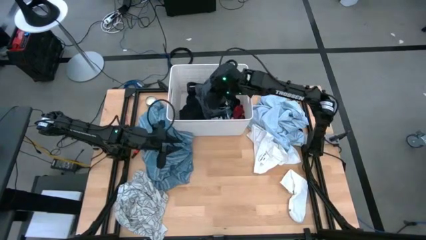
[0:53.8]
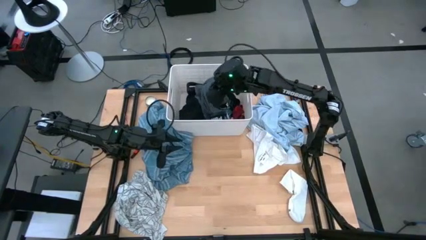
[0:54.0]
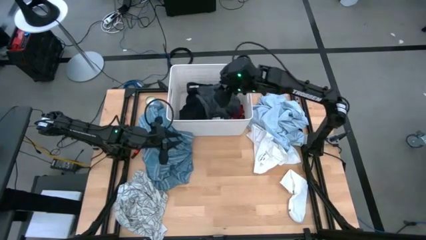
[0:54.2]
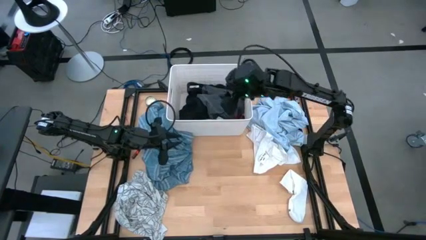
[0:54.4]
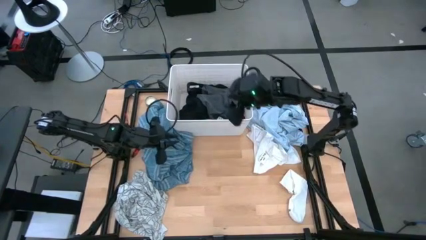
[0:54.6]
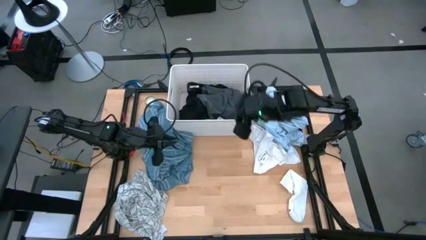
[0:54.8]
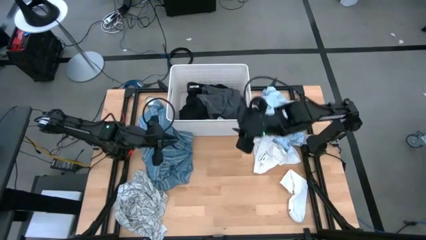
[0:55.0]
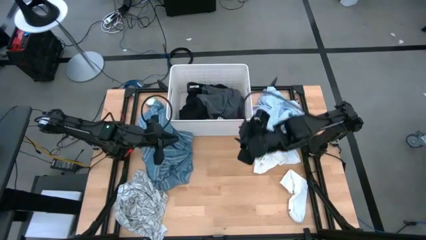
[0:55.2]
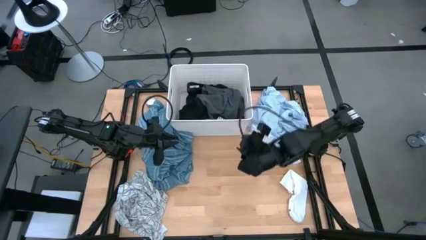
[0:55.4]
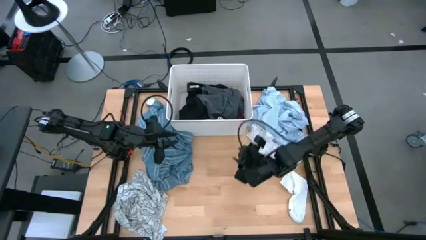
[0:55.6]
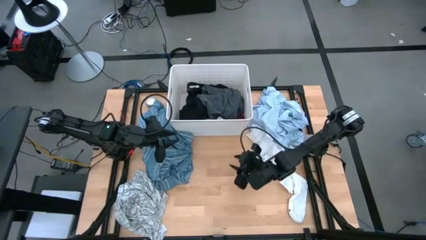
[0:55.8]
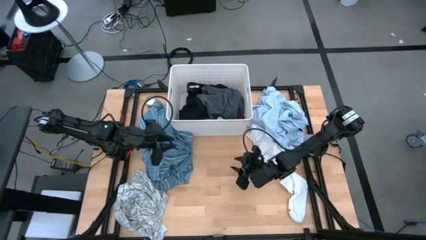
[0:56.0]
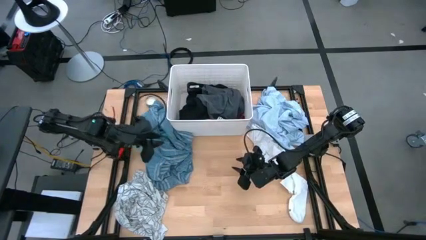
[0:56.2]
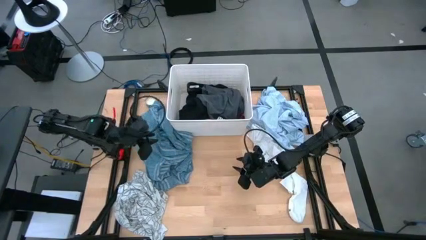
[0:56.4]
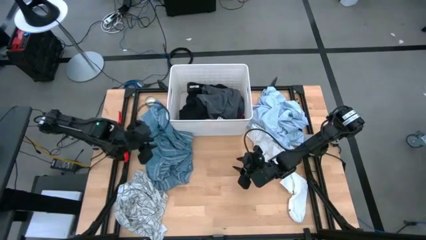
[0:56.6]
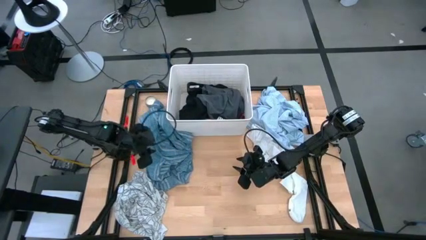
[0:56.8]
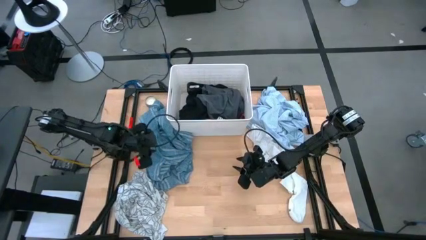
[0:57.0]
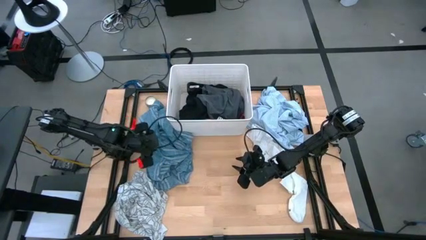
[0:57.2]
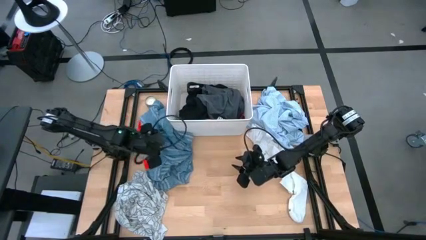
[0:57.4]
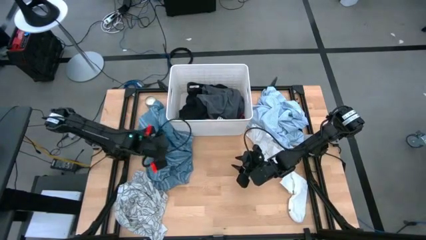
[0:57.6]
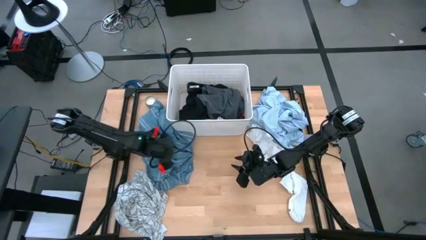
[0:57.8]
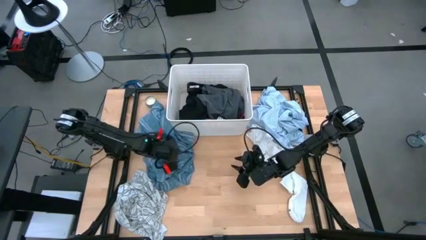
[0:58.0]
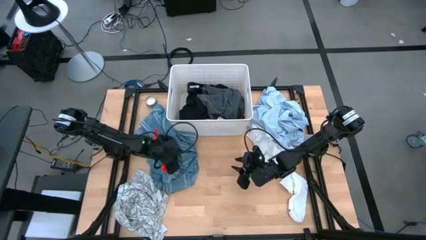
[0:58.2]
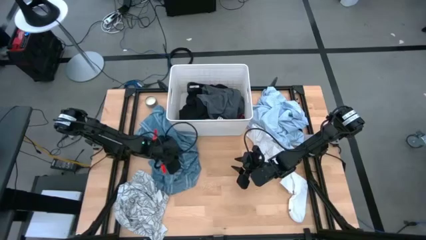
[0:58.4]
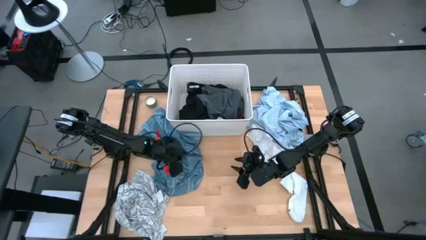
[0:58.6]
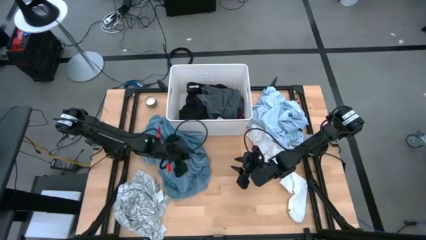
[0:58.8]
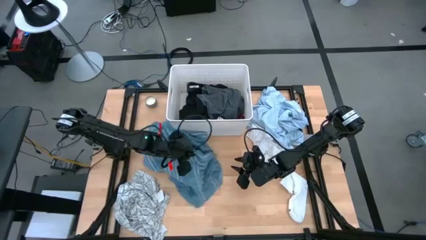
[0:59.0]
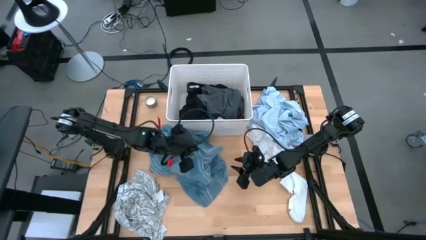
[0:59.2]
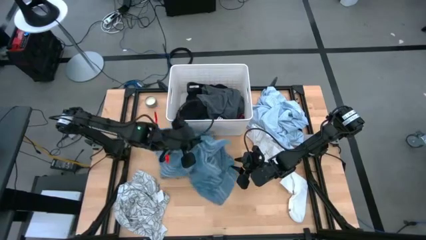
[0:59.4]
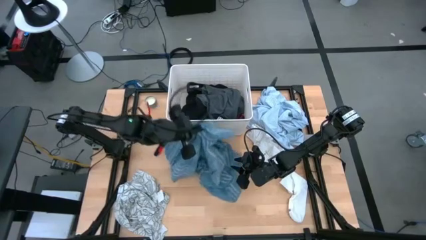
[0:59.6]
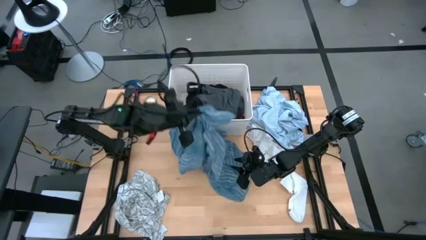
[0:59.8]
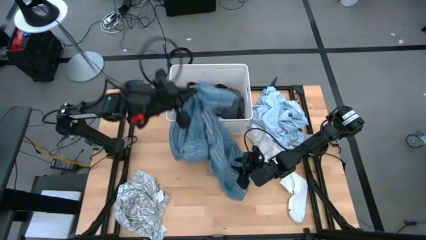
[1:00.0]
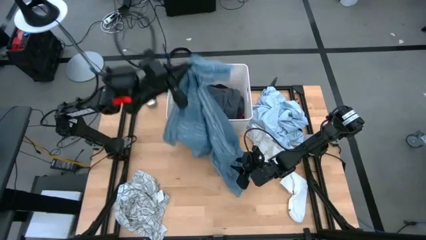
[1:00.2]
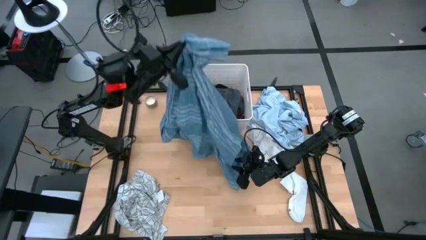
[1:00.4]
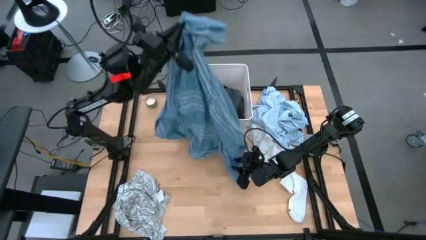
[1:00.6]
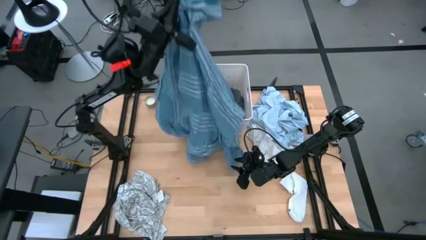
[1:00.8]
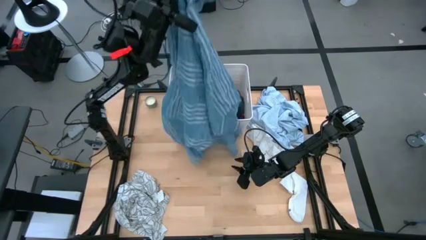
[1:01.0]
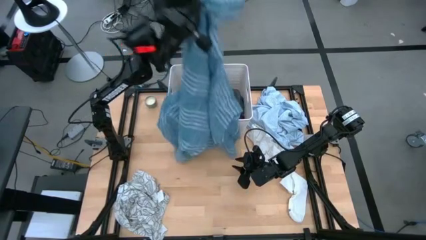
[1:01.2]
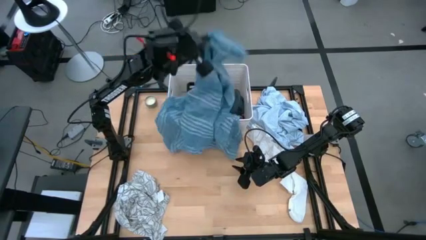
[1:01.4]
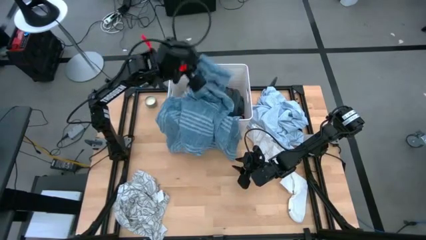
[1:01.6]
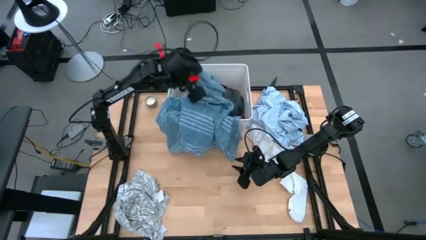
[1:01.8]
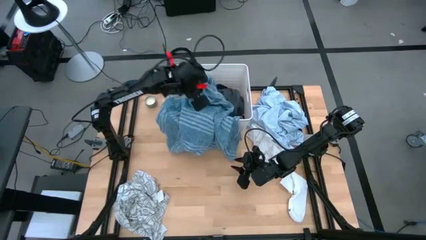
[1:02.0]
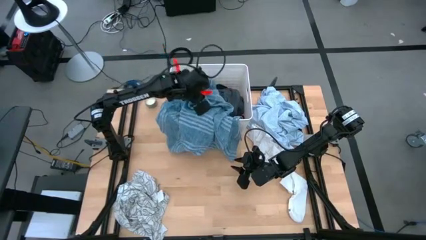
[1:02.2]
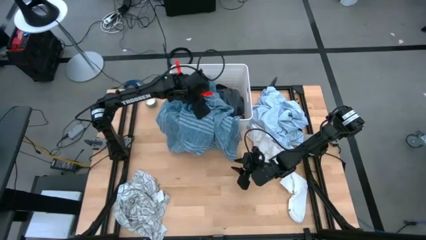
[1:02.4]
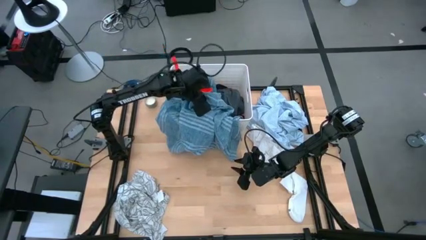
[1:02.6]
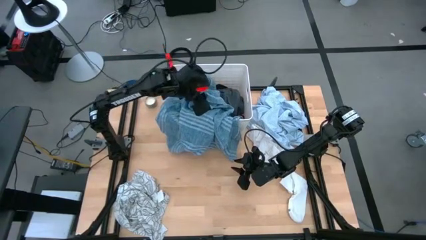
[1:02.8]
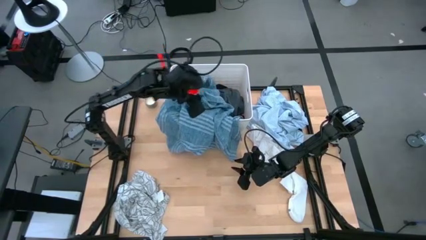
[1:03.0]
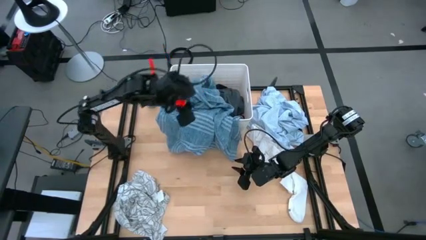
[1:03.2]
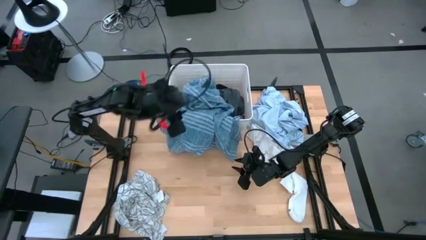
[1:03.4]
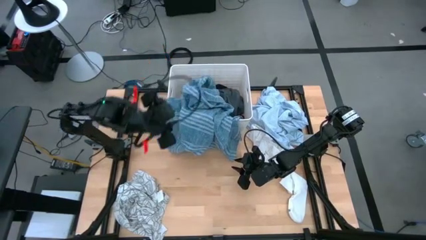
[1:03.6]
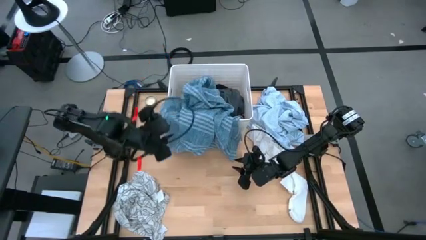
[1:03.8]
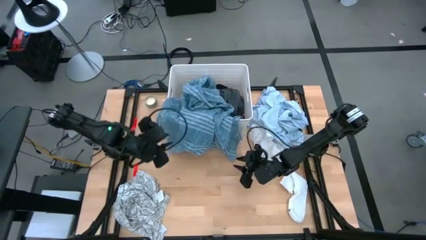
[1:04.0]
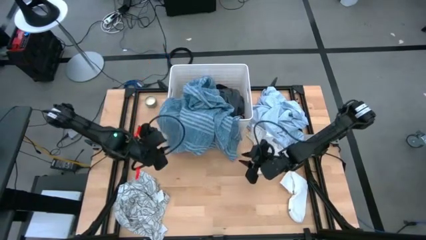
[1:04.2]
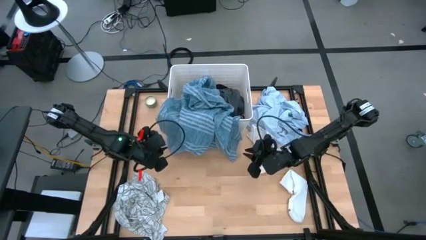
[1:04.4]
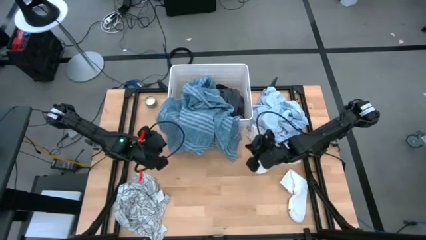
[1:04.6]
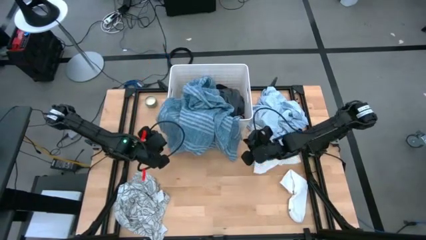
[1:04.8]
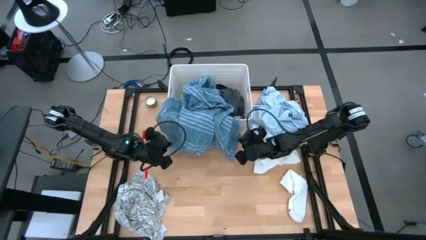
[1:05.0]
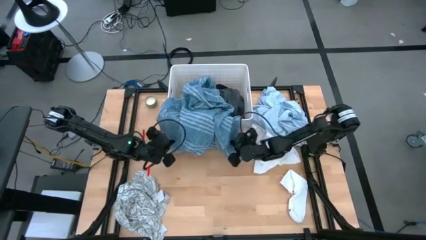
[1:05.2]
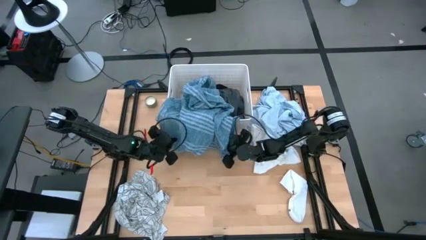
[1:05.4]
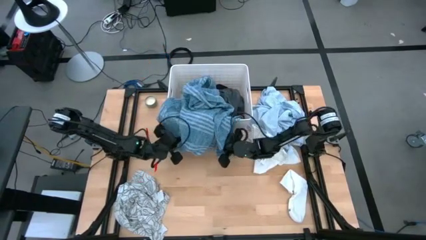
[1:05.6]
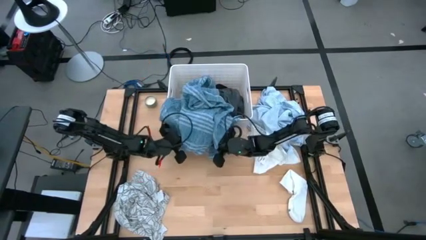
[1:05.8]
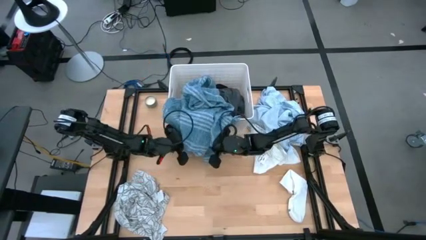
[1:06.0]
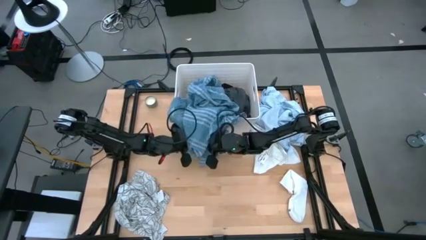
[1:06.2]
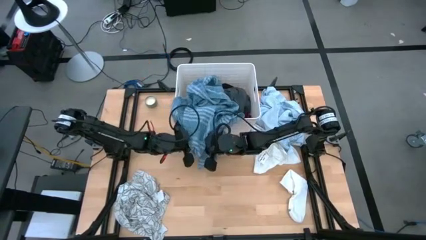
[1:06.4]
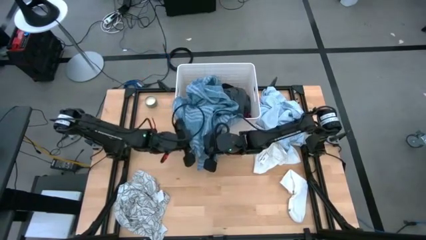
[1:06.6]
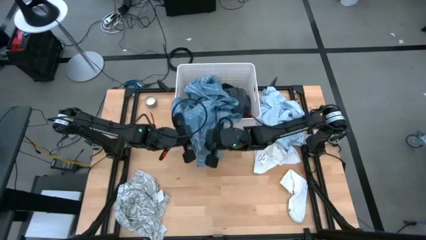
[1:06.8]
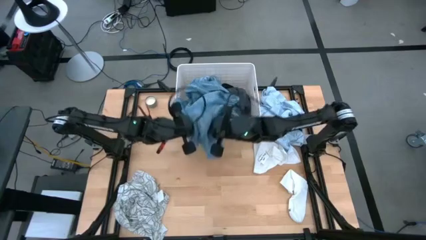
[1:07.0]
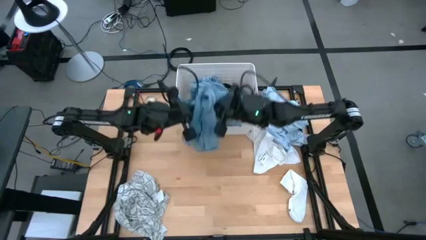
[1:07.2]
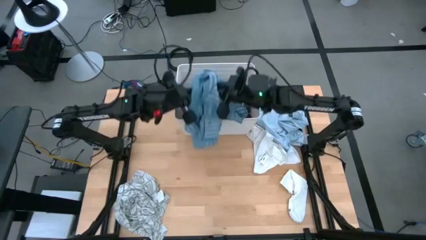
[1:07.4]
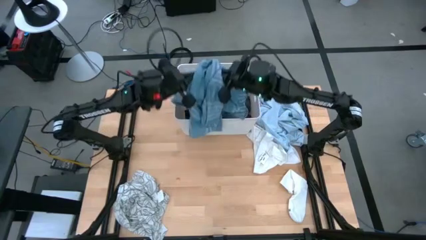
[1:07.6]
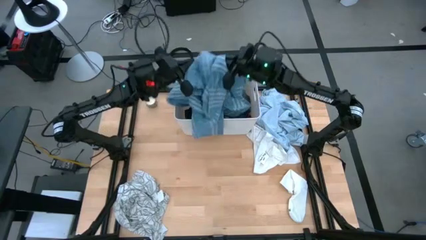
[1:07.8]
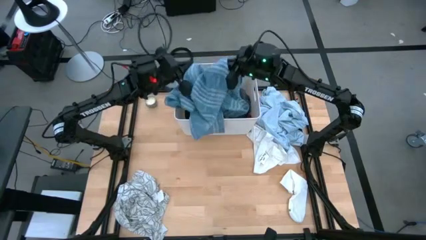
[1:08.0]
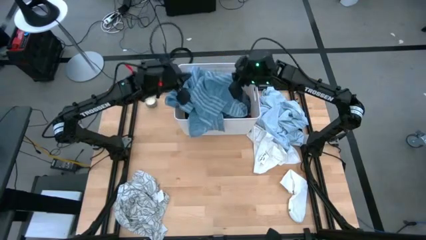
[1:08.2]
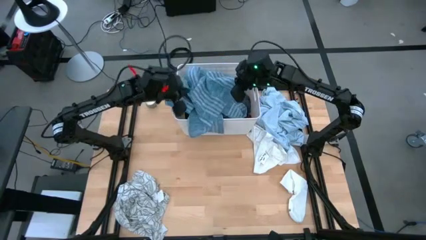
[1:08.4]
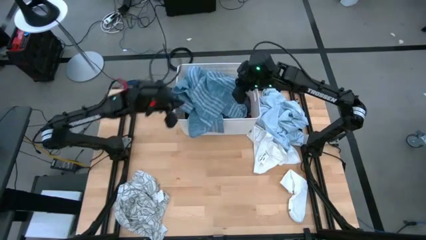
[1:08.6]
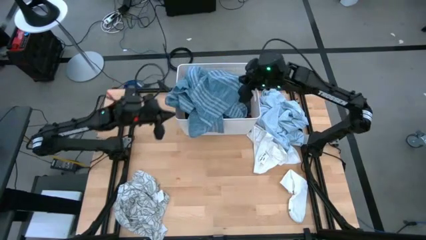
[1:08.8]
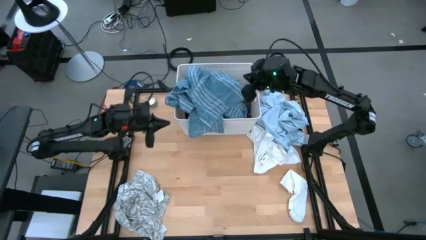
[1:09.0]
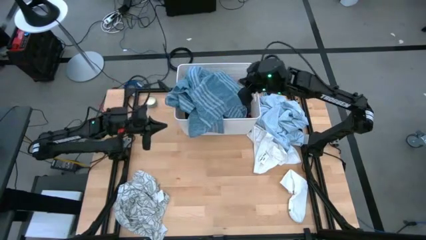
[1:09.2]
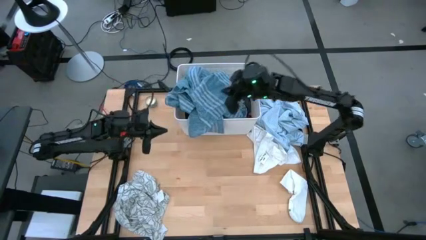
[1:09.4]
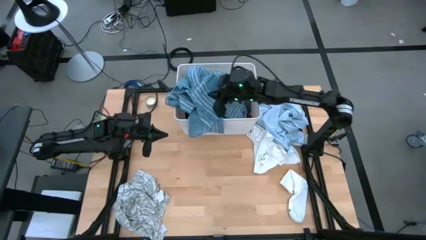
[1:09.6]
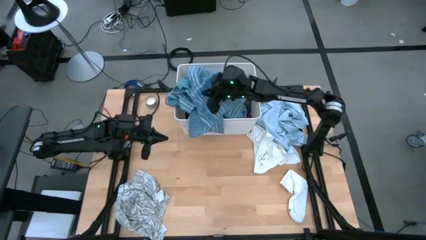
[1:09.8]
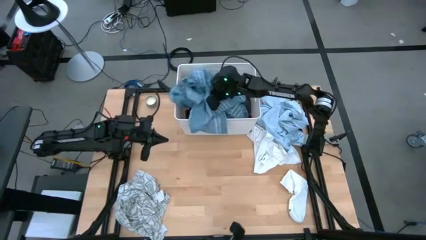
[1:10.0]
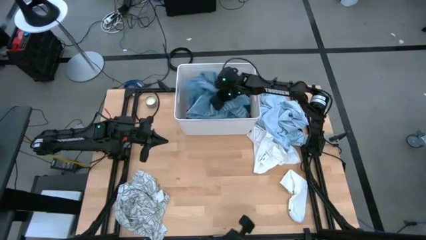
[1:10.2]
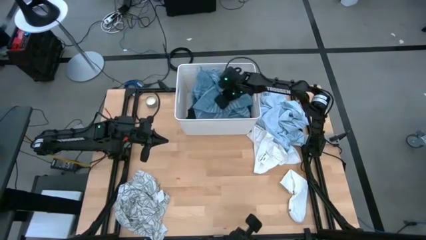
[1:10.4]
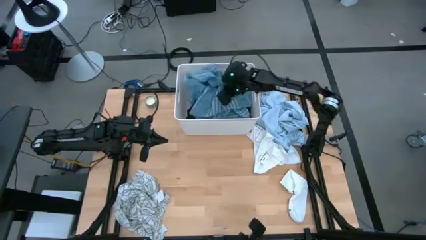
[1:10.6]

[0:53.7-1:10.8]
Task: Sort clothes
Put the blue polo shirt into the laundry bin
